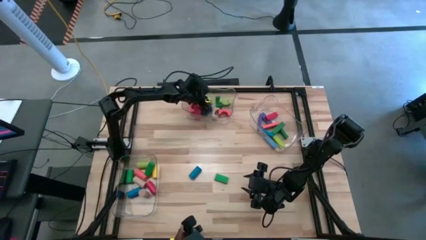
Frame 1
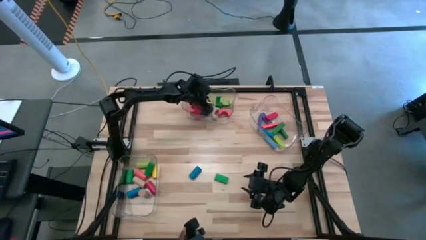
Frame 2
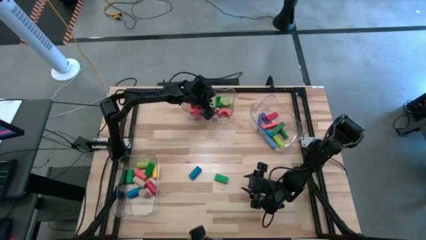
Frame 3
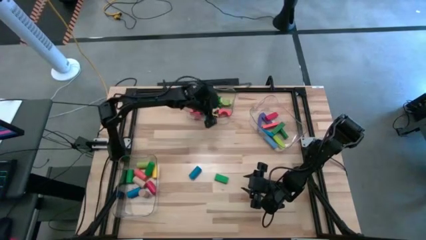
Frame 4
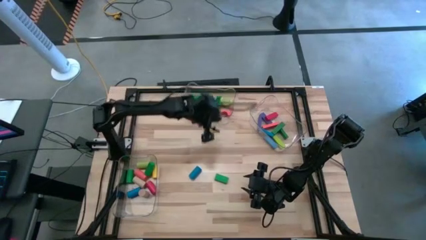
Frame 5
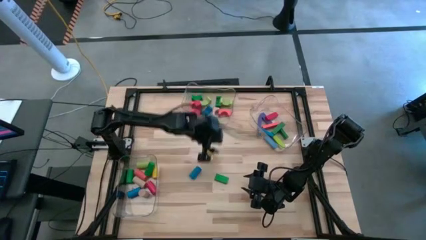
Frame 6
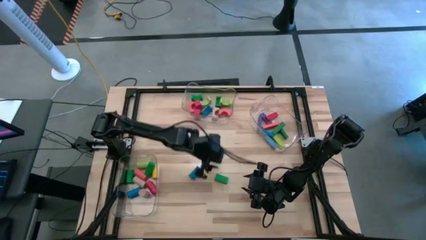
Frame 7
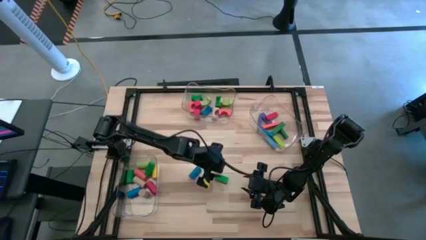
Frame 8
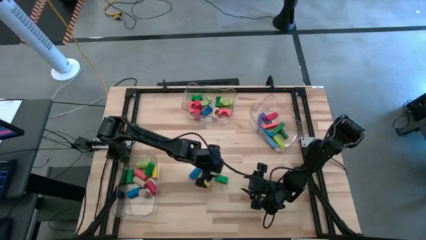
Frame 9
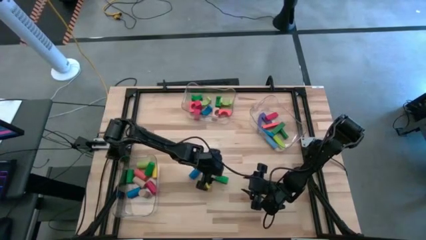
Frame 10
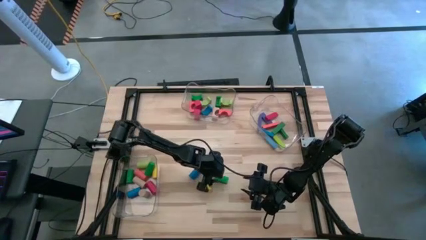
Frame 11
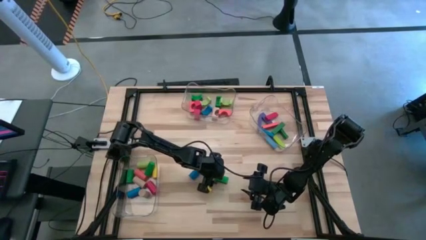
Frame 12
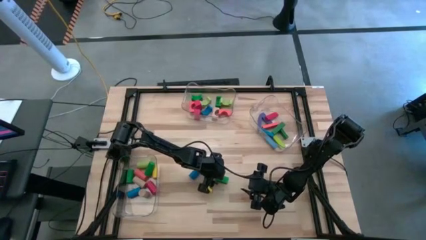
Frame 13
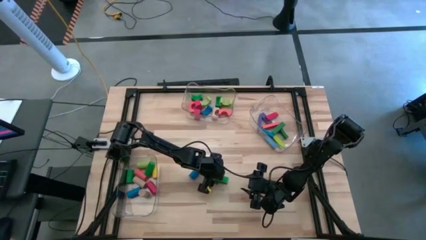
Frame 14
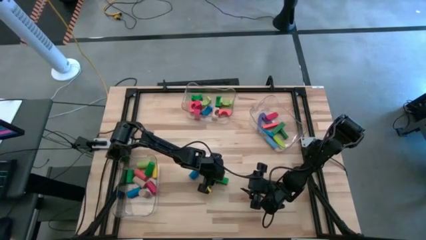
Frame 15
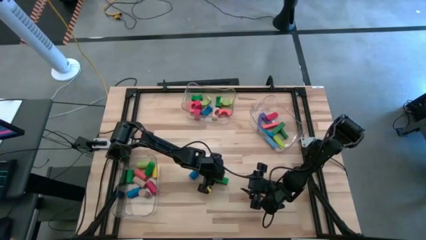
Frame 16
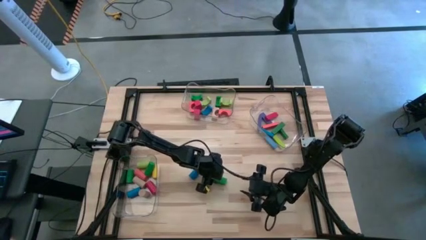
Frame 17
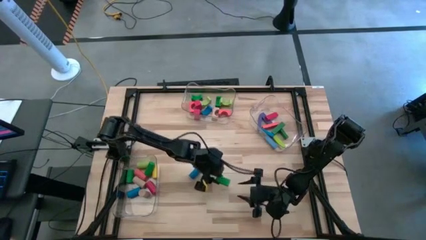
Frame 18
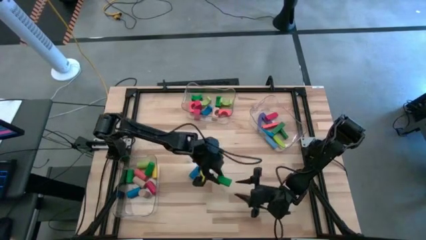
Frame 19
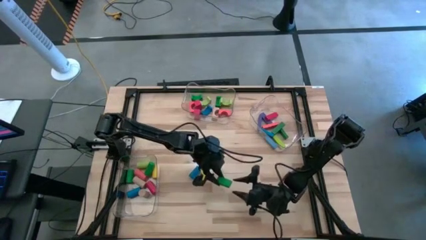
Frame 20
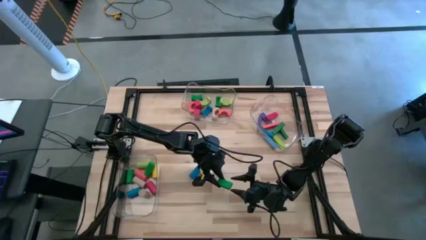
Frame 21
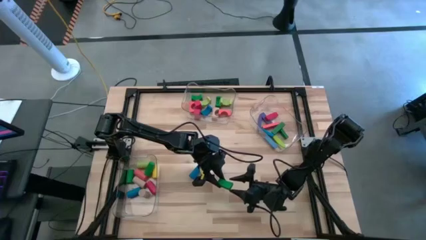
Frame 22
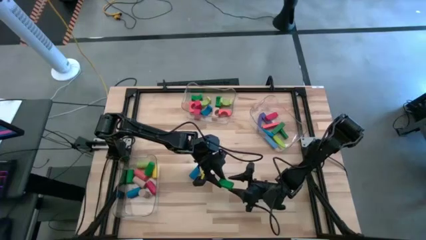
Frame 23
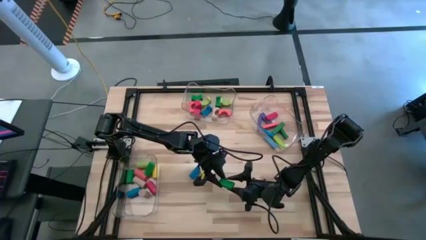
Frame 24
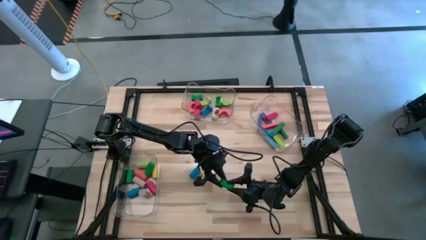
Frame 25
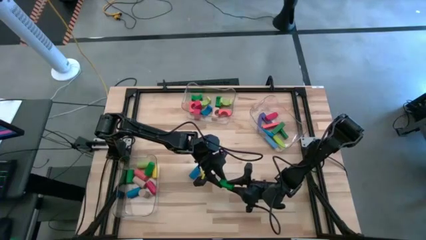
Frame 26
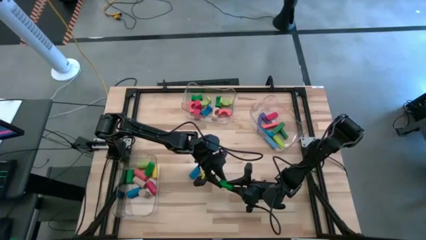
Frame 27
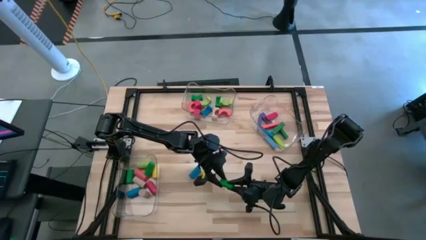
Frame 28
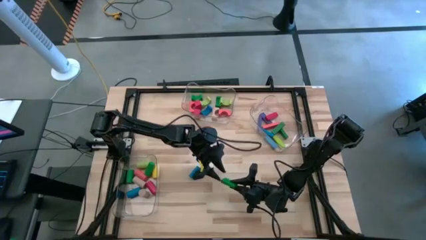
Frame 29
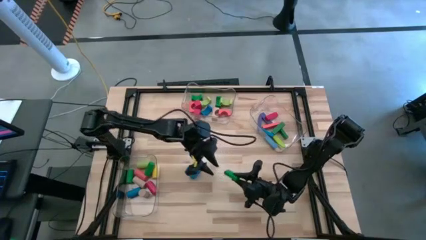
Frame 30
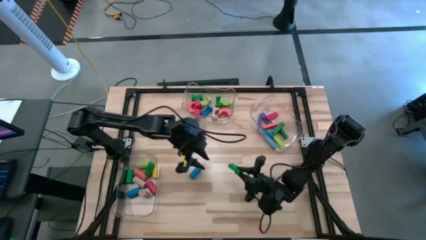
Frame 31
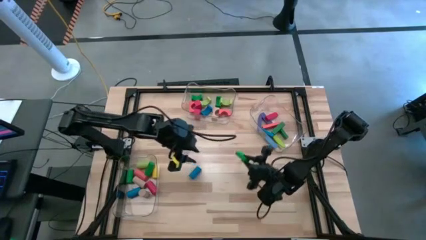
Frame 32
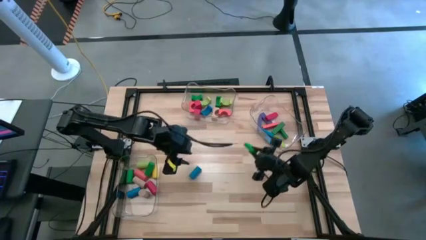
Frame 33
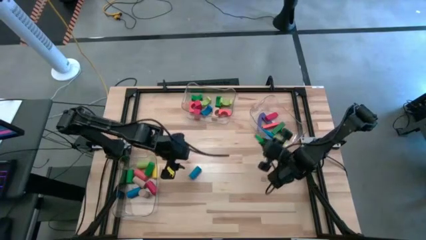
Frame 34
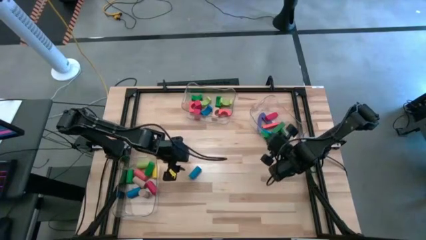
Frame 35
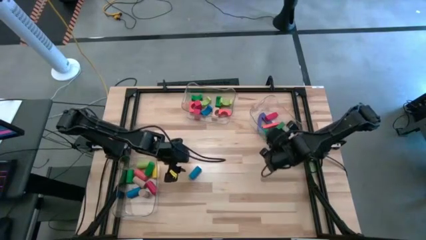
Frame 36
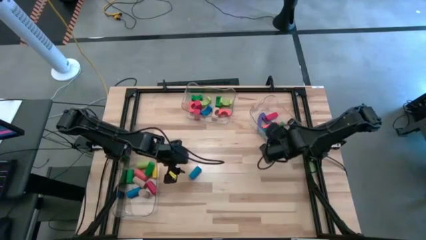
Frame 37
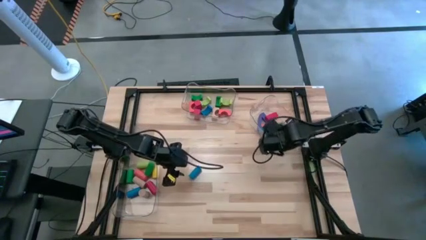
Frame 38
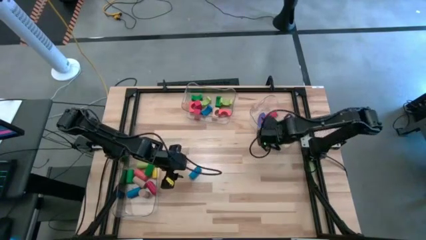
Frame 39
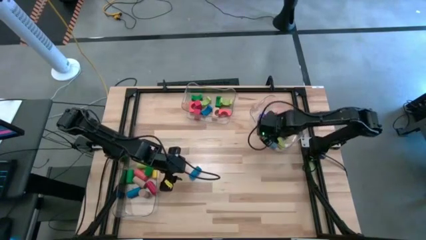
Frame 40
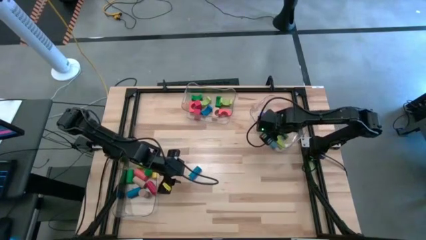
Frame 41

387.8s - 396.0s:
Task: Sort blocks by size
Put the green rectangular block into the right transparent bin

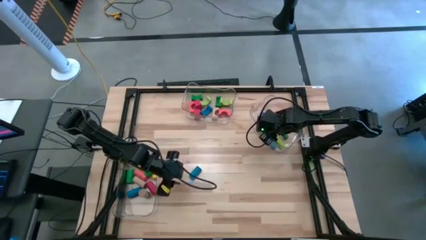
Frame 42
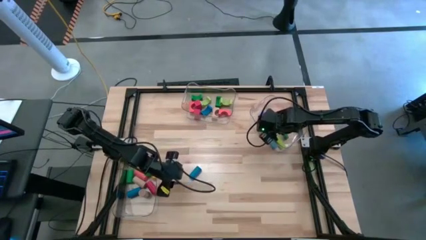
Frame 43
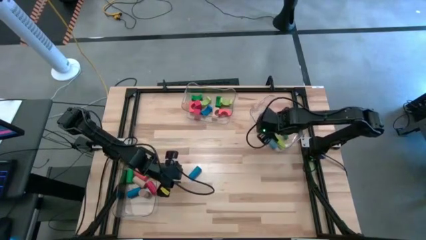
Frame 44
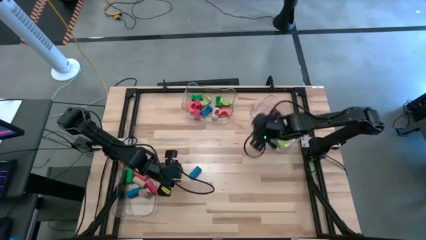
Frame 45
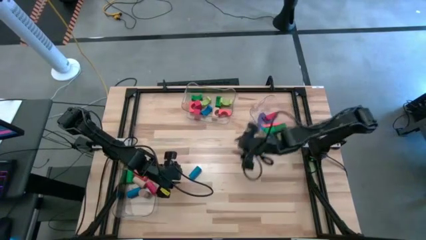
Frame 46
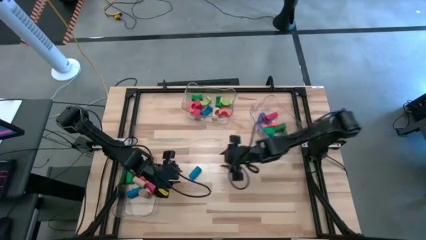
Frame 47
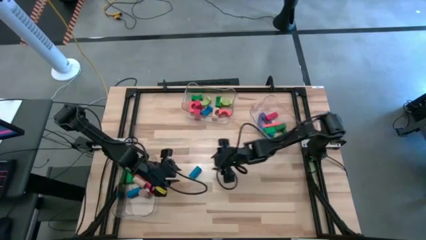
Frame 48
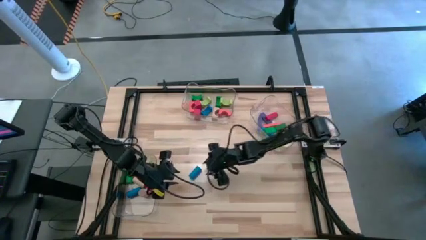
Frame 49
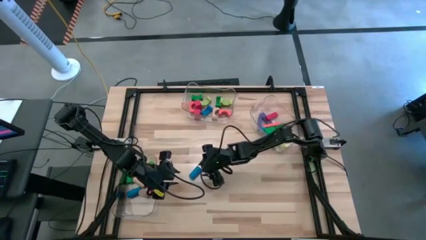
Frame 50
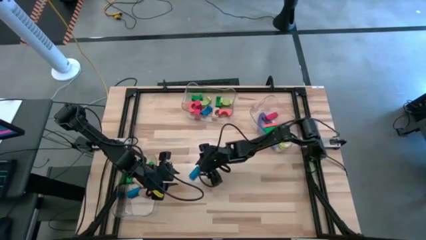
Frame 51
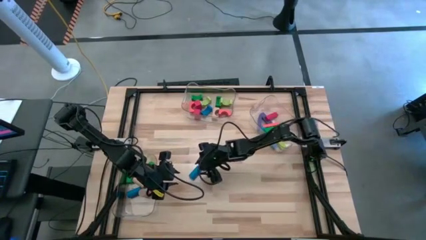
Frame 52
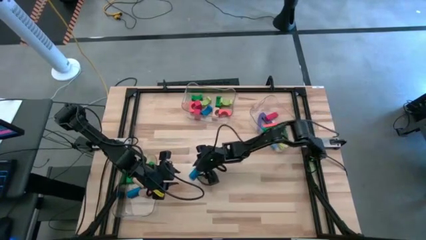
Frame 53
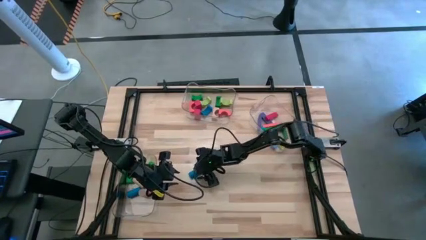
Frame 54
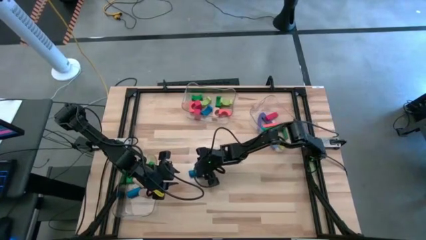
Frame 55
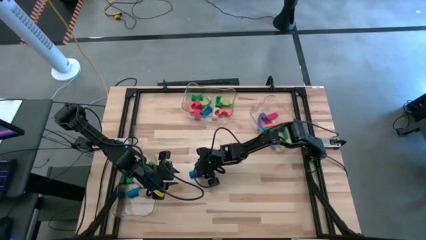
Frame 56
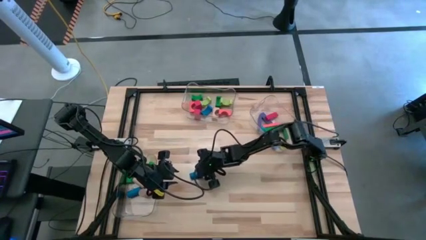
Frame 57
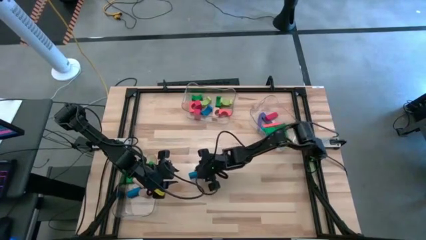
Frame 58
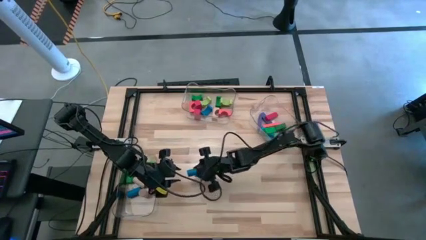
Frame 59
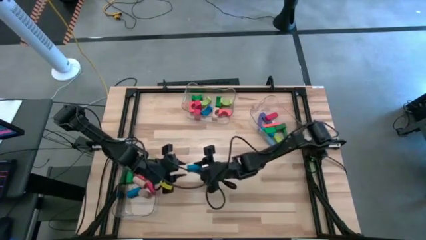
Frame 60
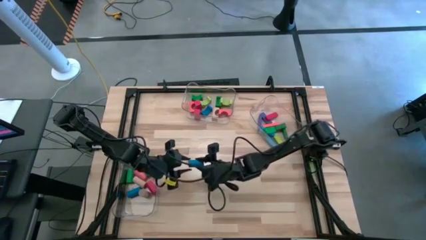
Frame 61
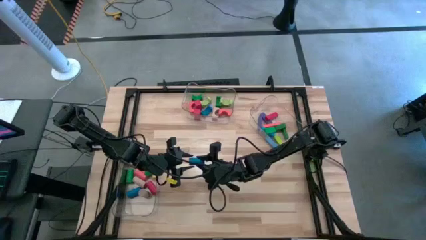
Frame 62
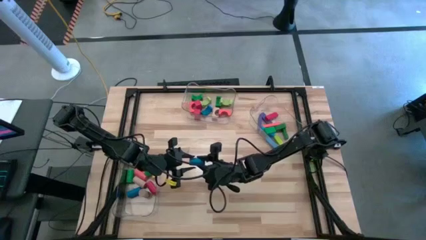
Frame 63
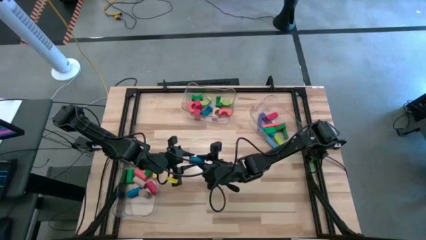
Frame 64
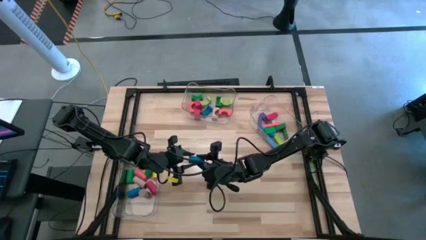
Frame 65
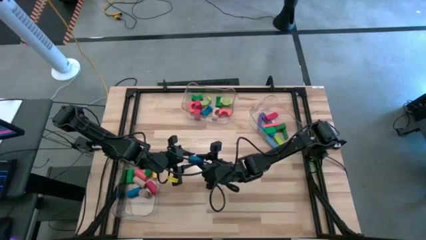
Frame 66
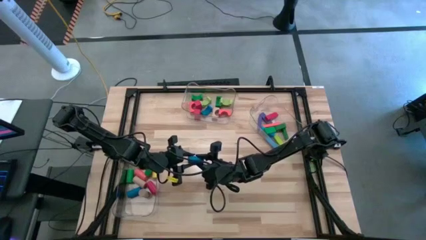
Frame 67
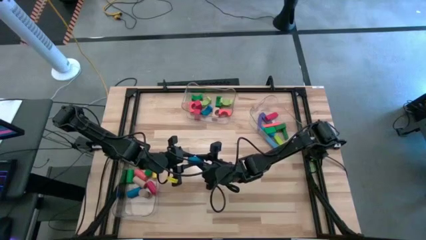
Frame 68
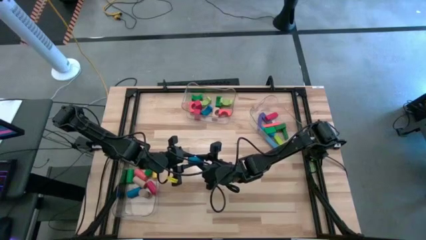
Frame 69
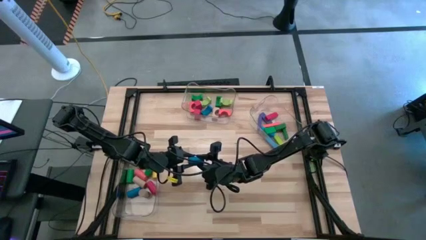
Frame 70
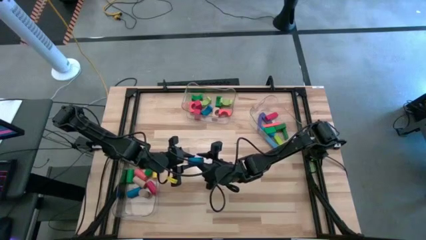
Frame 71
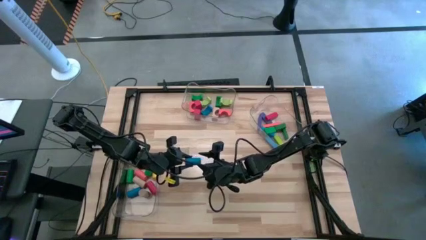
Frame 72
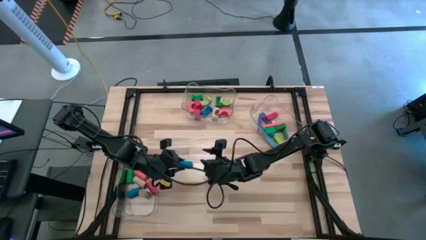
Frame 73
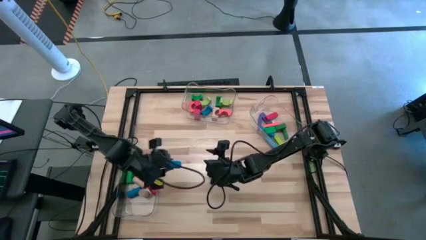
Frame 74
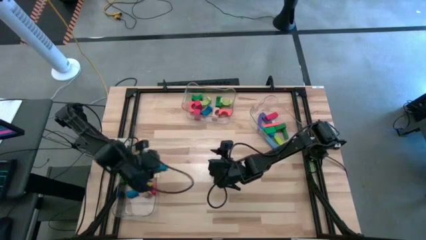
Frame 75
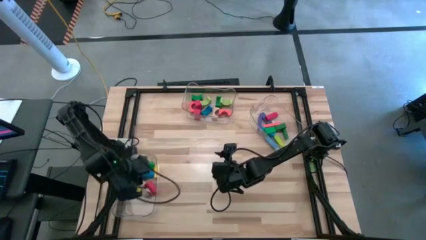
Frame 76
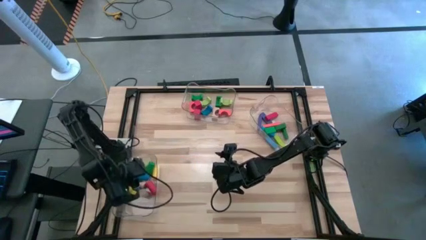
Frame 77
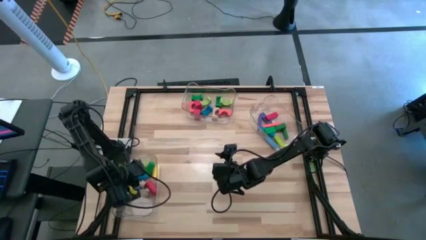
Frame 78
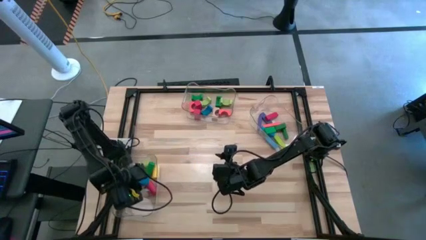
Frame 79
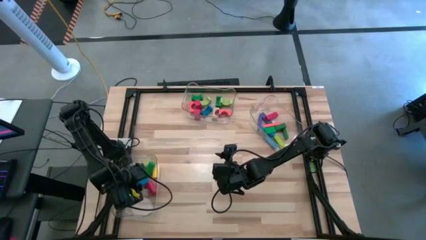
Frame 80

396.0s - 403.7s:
Put the blue cylindrical block into the left transparent bin
